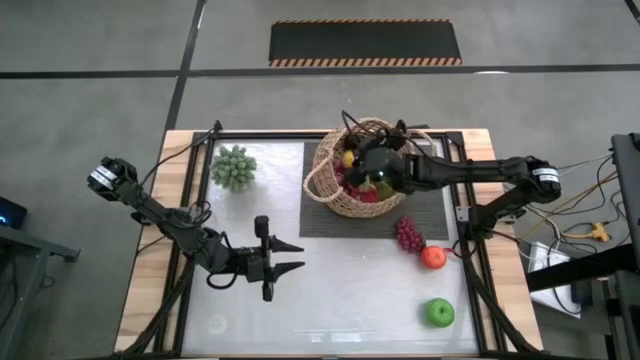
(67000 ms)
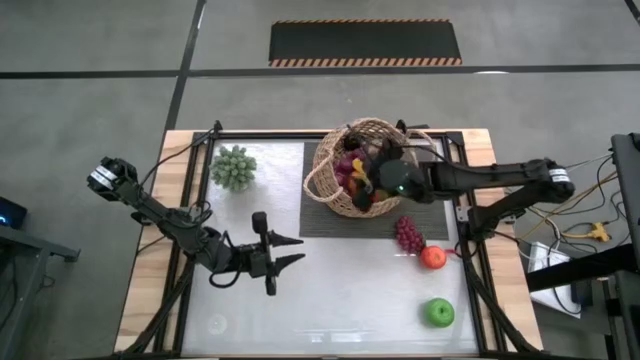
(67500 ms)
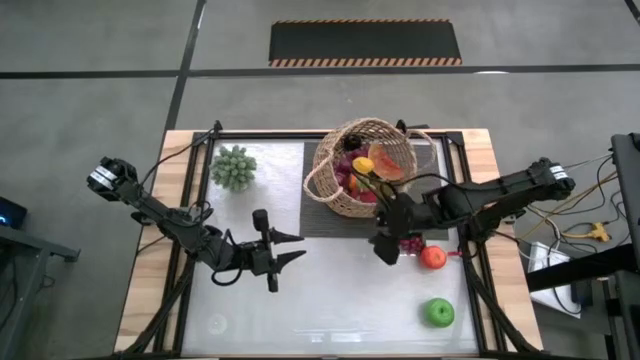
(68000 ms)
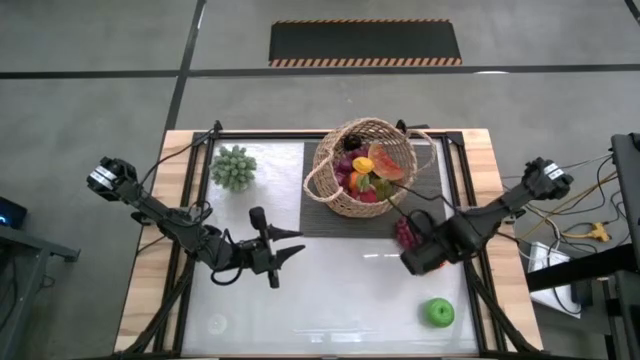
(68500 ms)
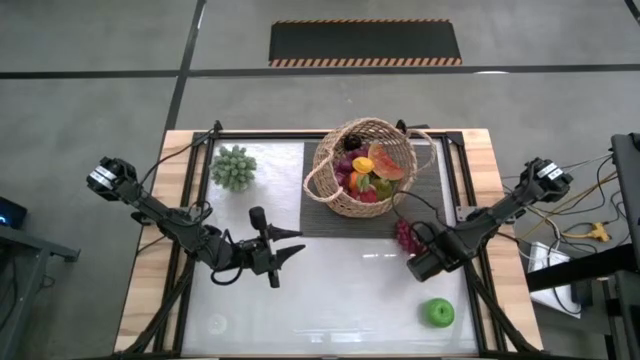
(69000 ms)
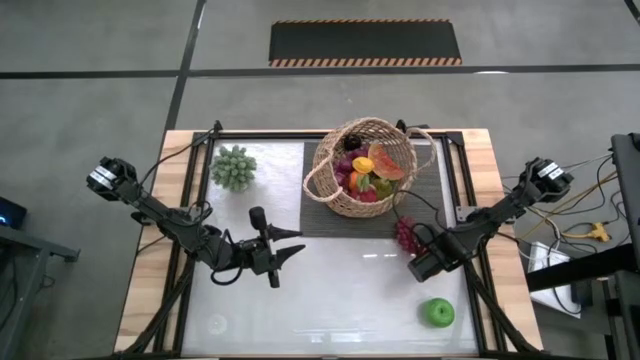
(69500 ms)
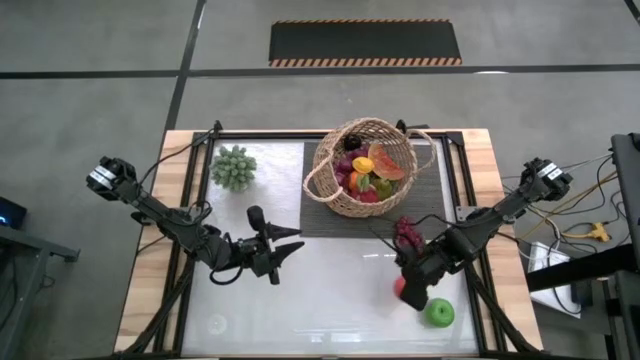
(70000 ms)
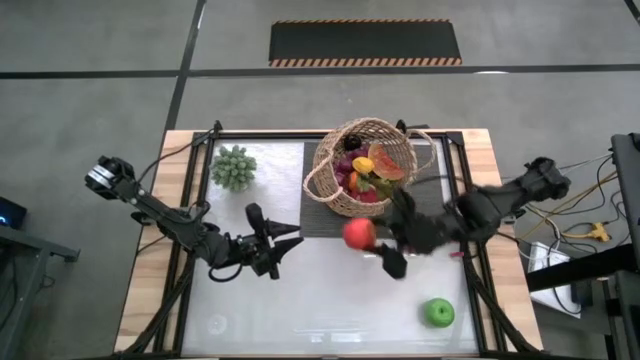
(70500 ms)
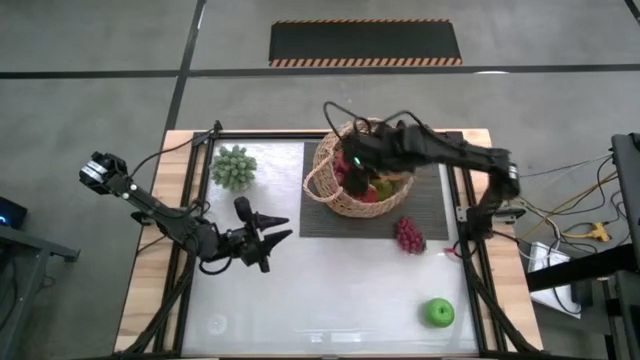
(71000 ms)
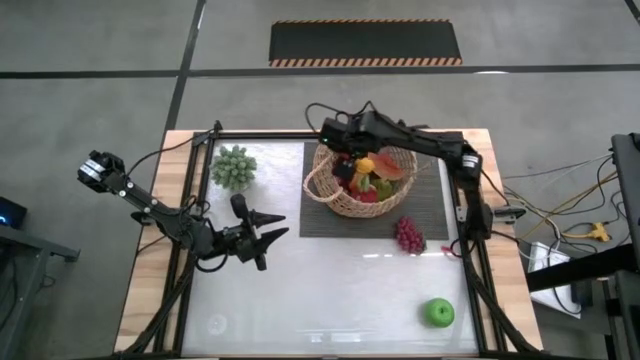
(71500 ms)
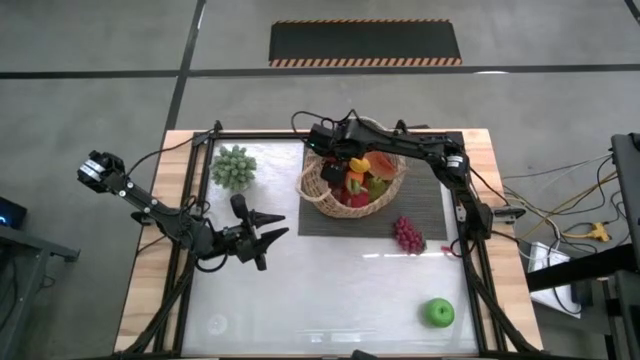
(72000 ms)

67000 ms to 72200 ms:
Task: Build produce basket
Put the red apple into the brown basket

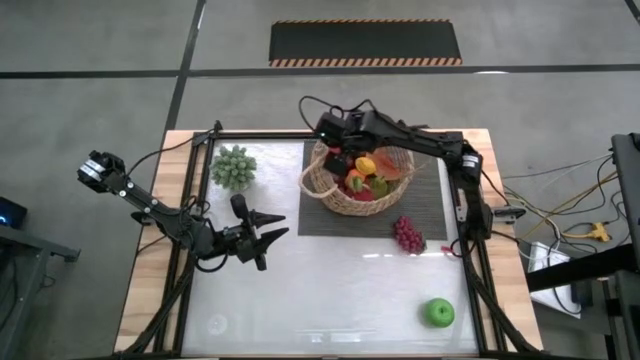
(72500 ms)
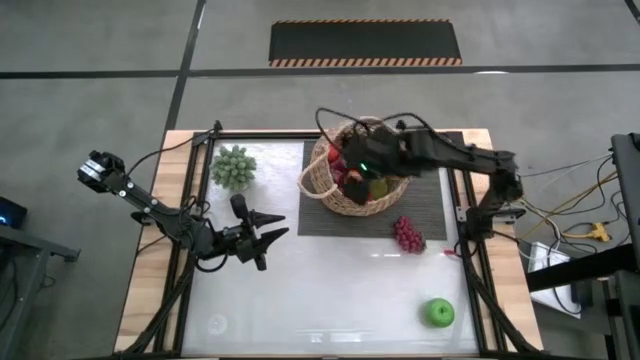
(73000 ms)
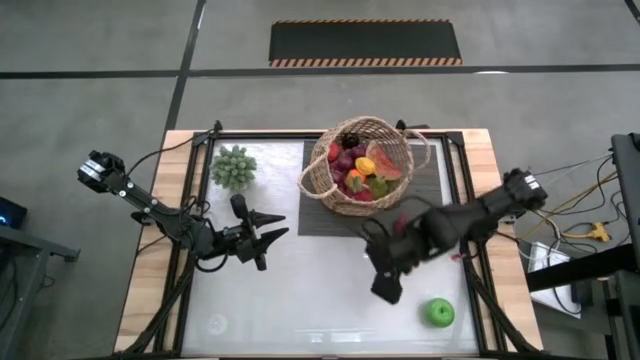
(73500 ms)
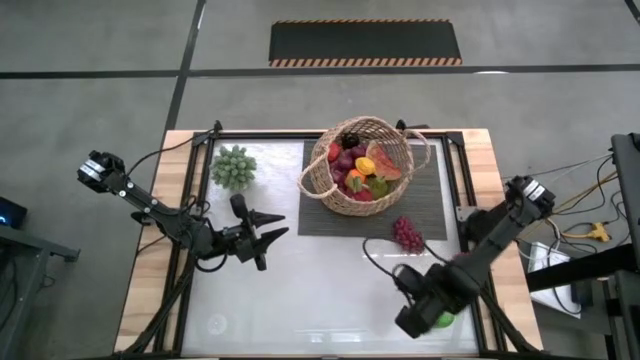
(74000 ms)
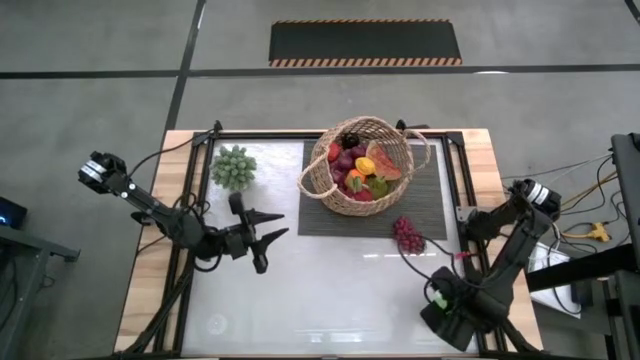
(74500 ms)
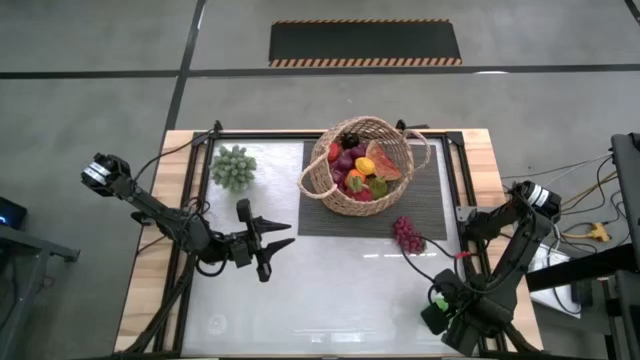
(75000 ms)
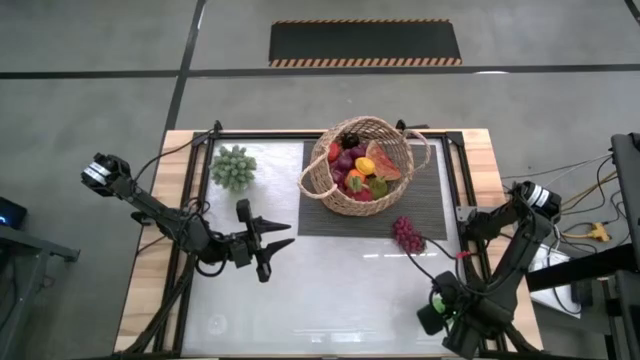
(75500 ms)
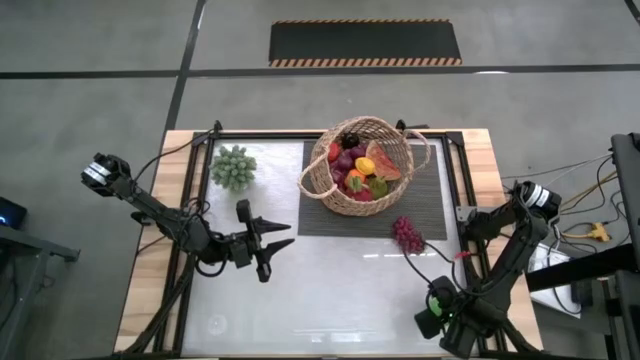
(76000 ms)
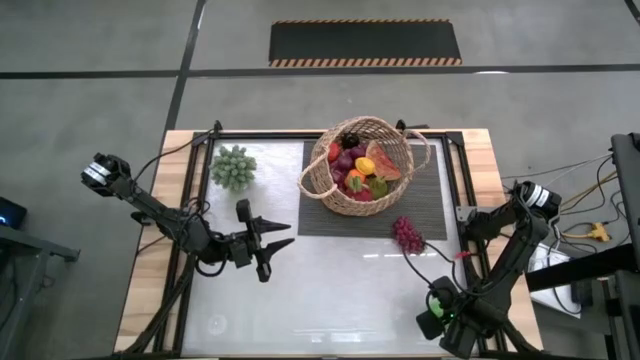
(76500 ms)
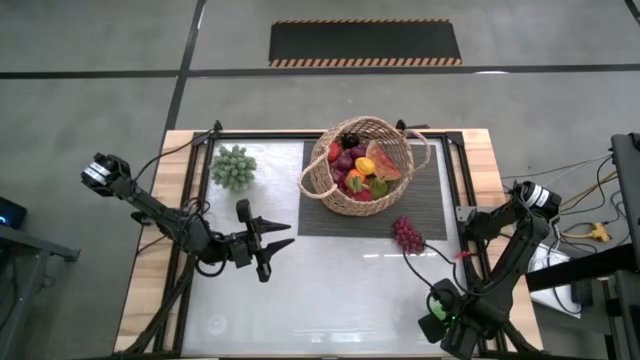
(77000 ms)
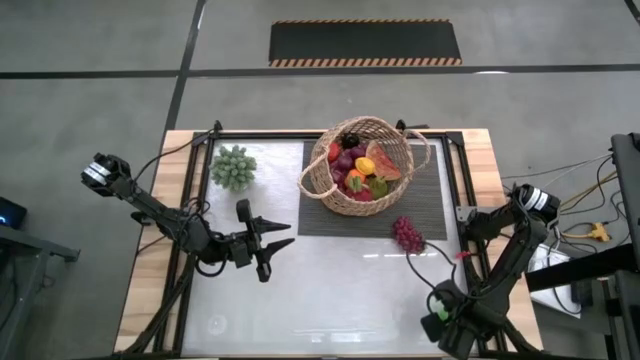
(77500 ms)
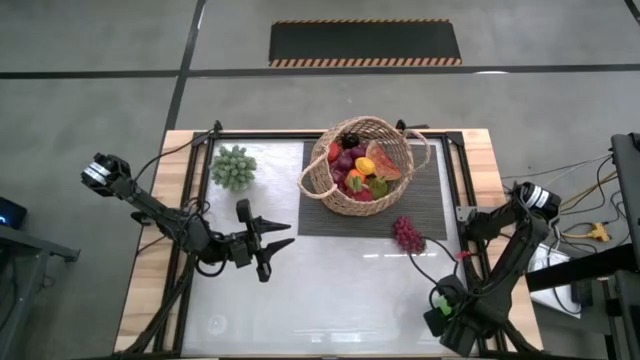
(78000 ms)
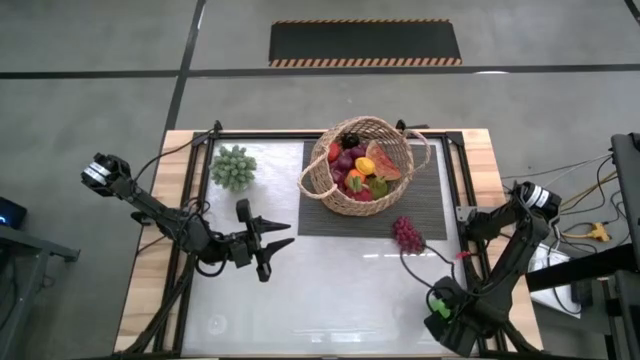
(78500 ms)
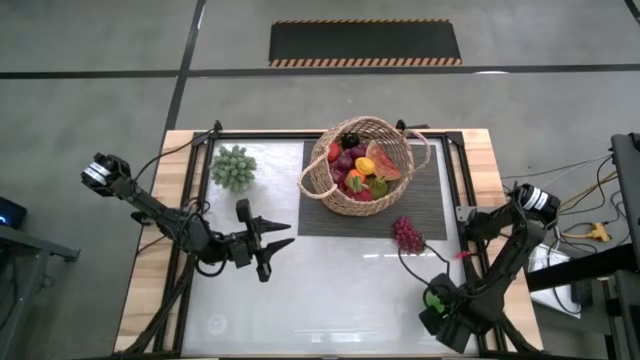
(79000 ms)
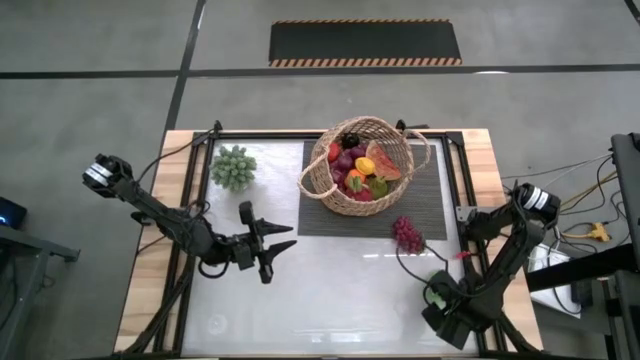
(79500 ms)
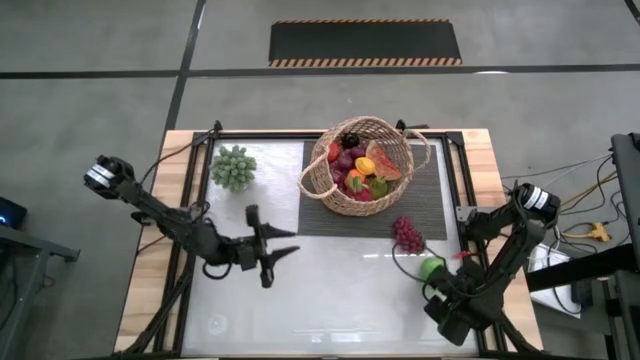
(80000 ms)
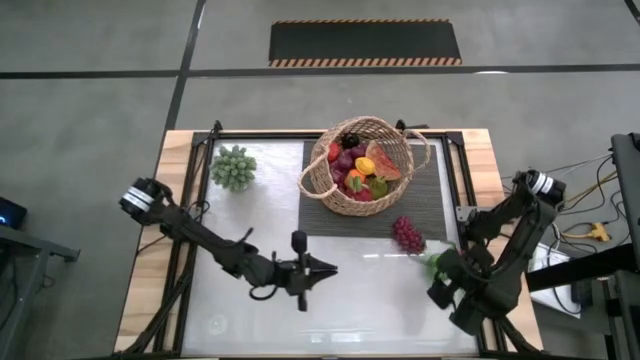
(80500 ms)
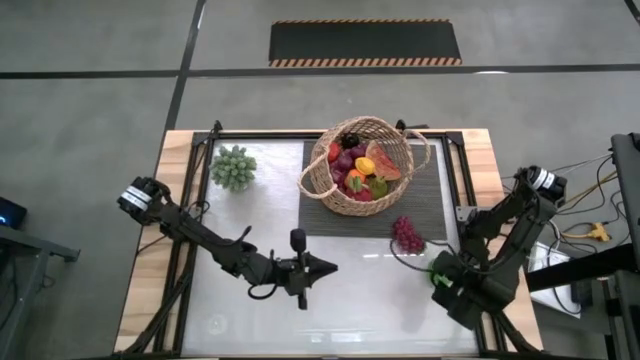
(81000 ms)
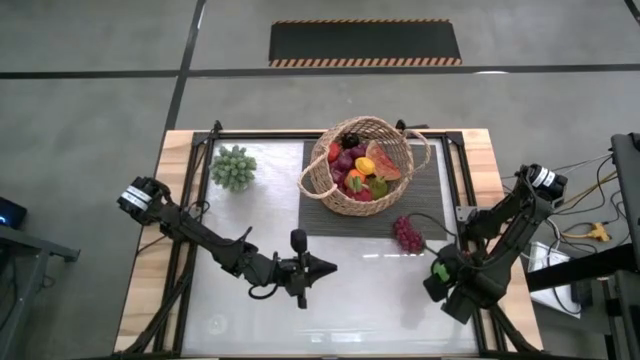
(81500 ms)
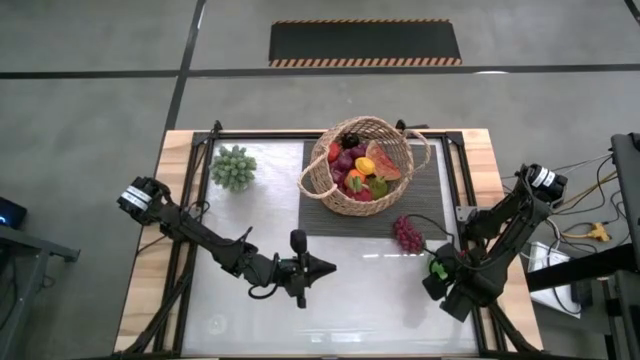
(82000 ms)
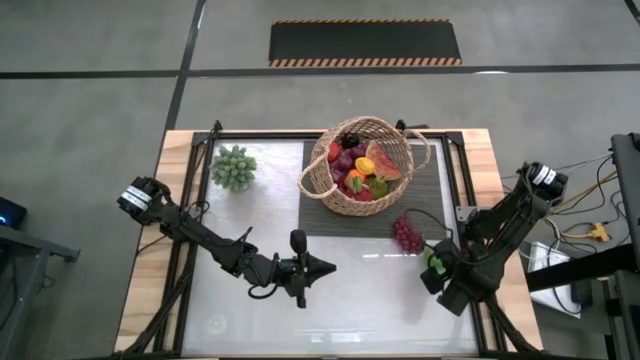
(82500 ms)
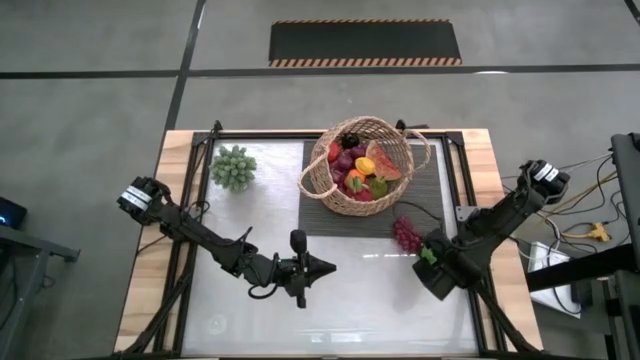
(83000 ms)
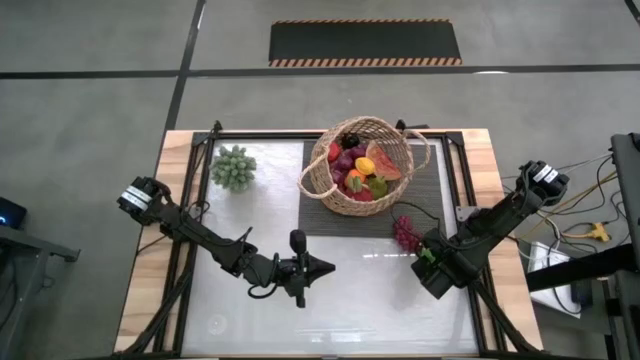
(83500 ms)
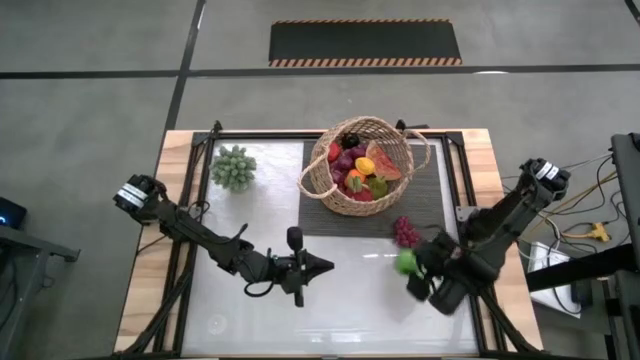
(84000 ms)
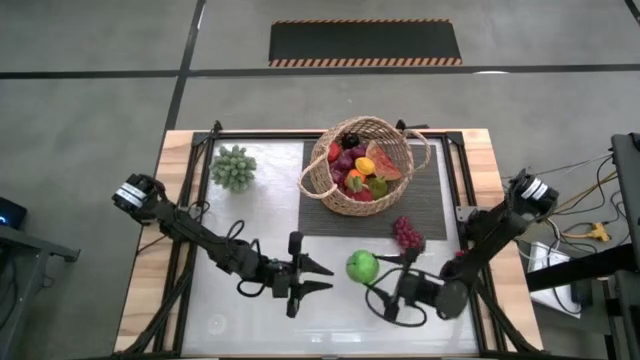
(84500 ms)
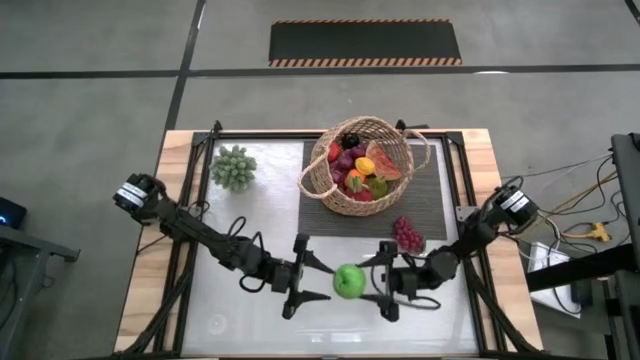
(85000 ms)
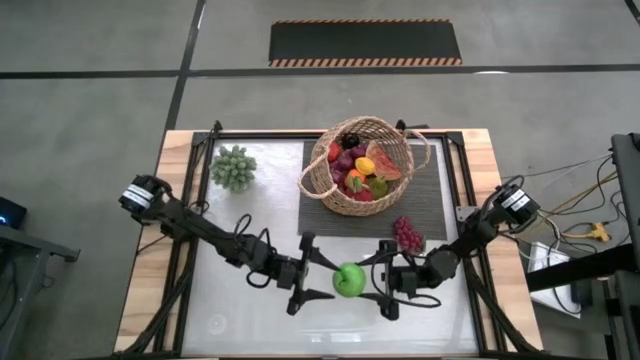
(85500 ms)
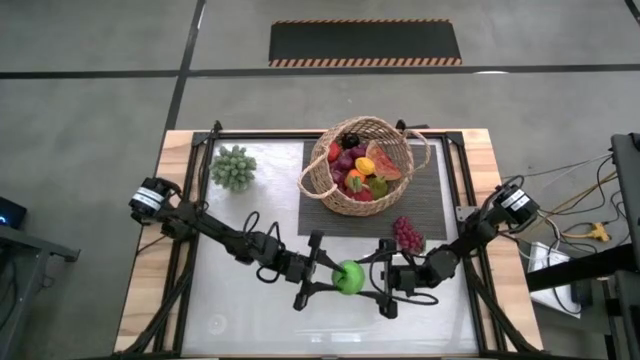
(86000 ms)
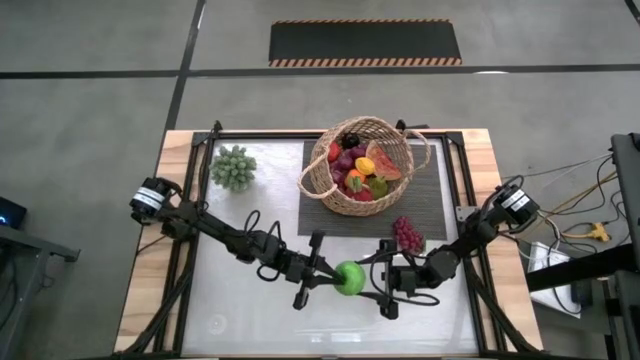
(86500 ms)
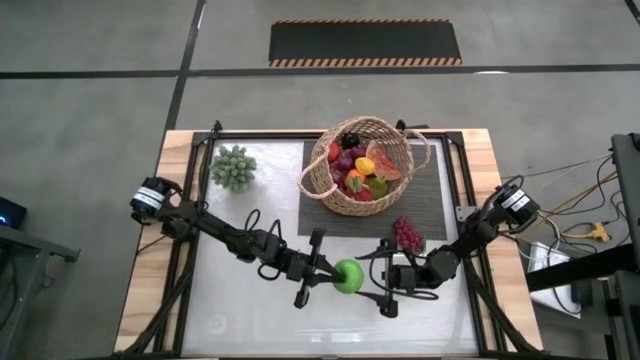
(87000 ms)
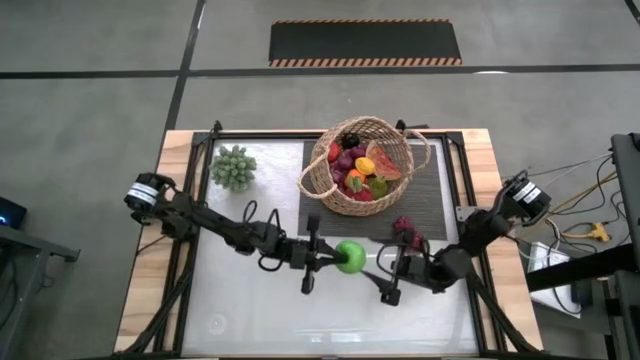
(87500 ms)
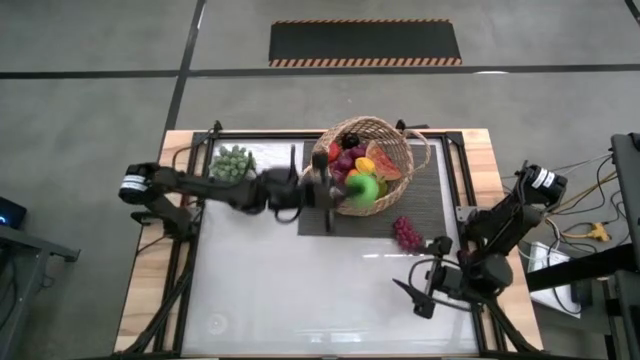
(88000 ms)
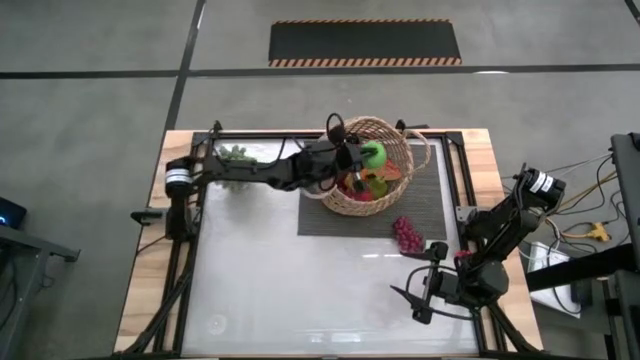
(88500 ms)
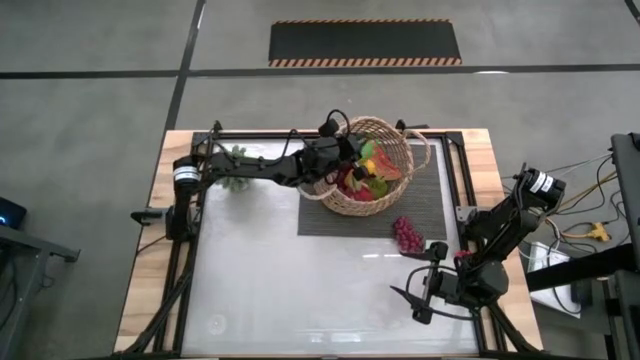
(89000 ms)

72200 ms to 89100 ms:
Put the green apple into the brown basket
